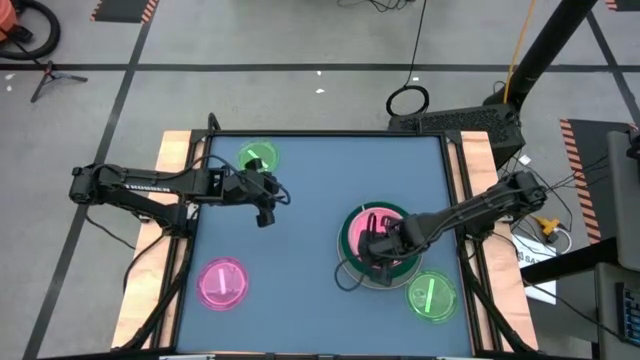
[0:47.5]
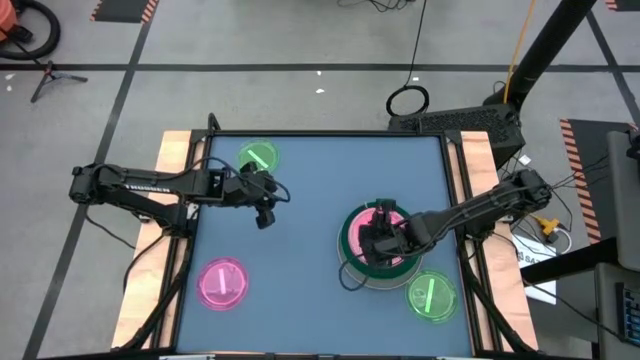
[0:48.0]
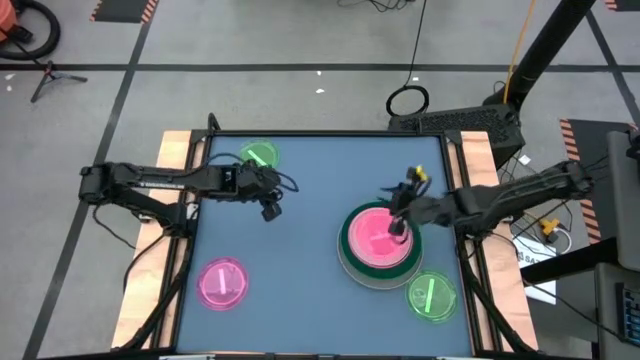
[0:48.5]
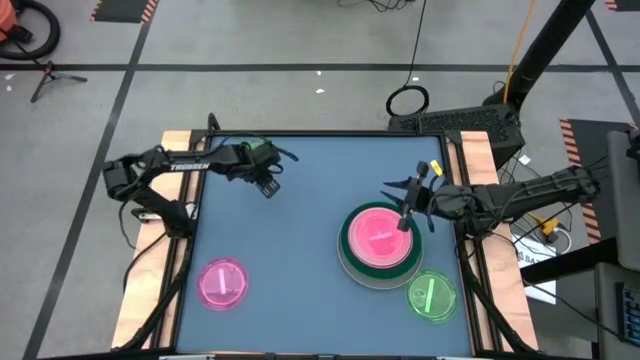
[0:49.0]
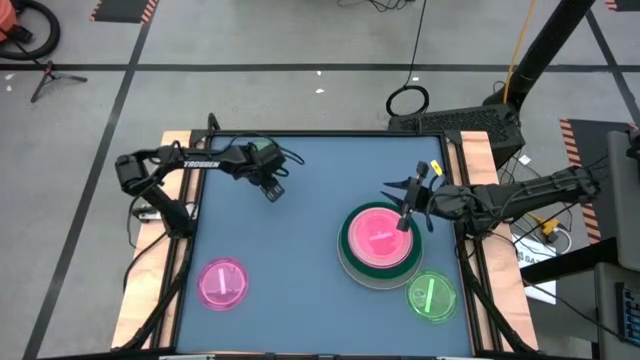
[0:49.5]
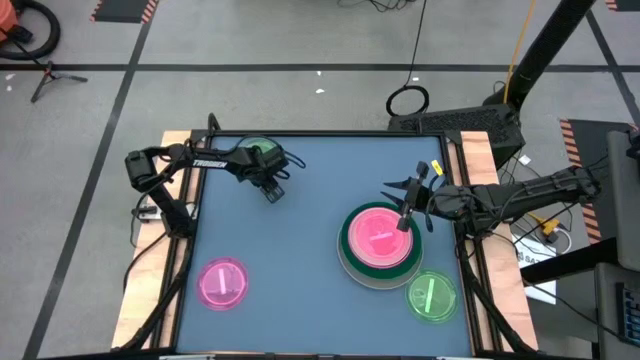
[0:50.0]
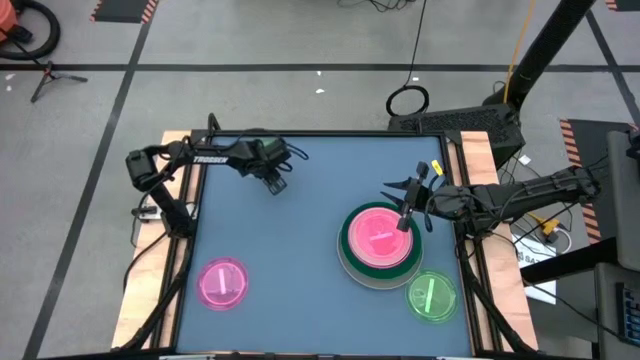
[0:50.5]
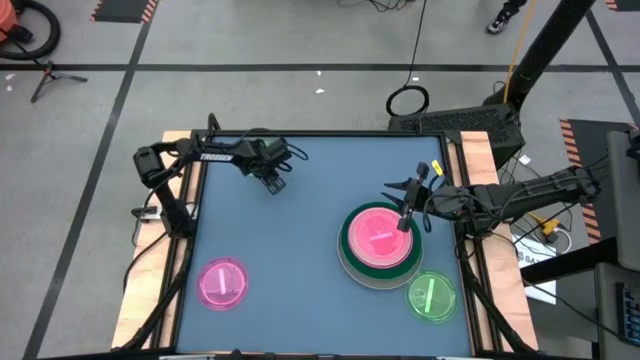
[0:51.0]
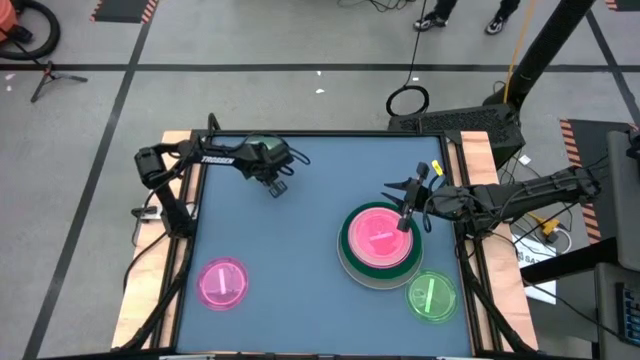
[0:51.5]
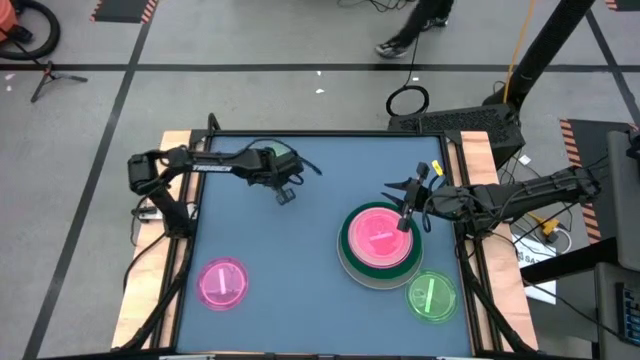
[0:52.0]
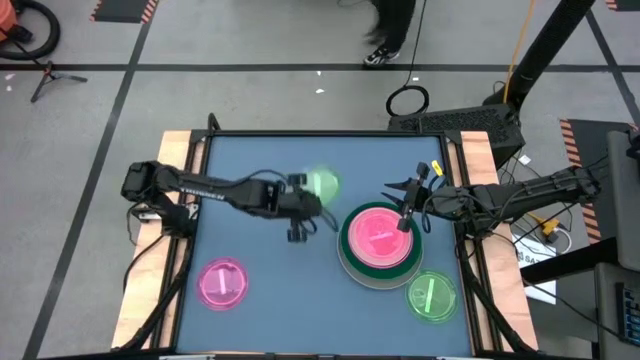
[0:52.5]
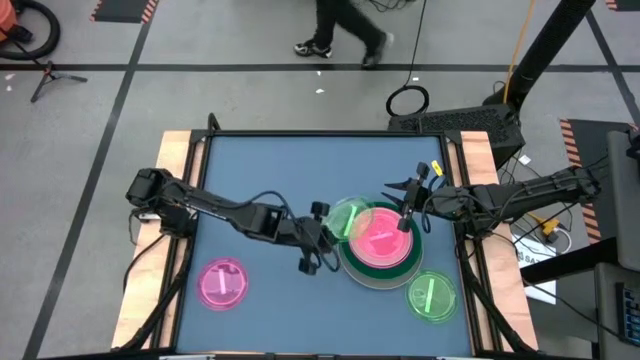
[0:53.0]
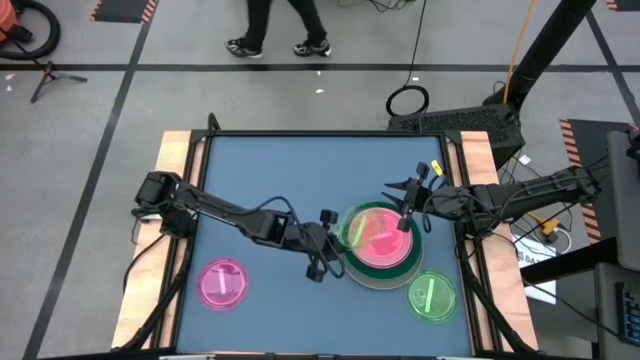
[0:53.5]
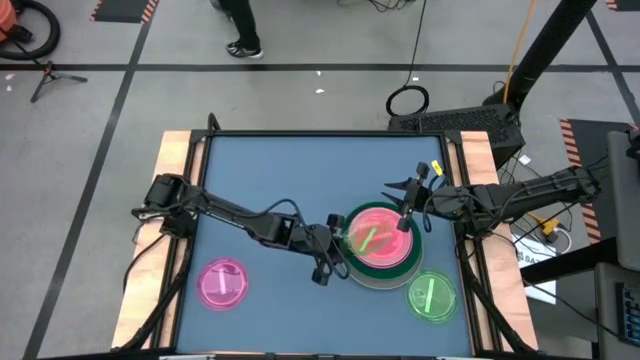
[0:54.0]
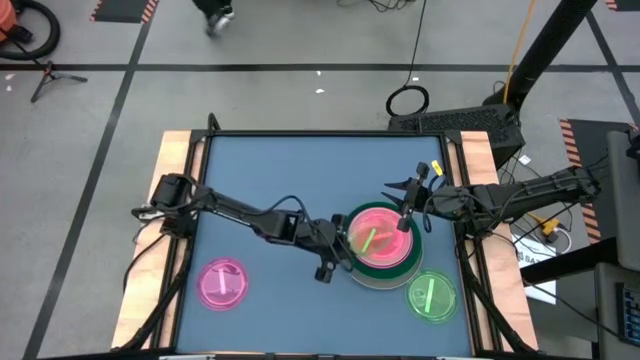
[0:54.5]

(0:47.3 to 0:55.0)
Task: Stack plastic plates
Stack the top light green plate on top of the light pink plate

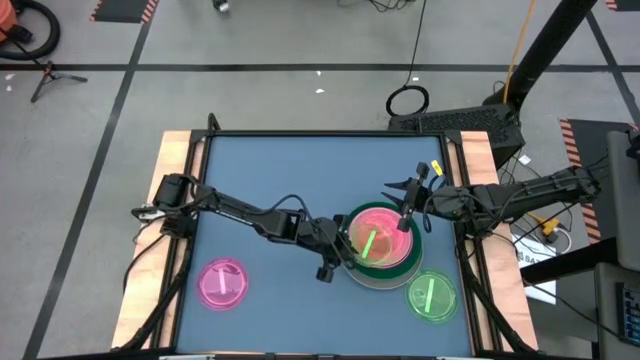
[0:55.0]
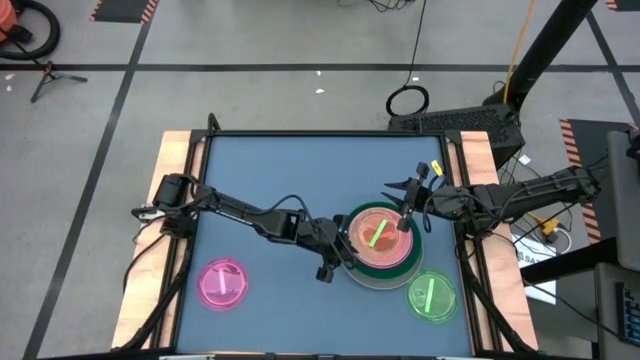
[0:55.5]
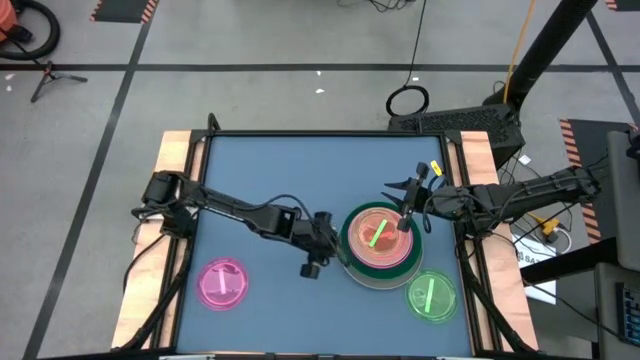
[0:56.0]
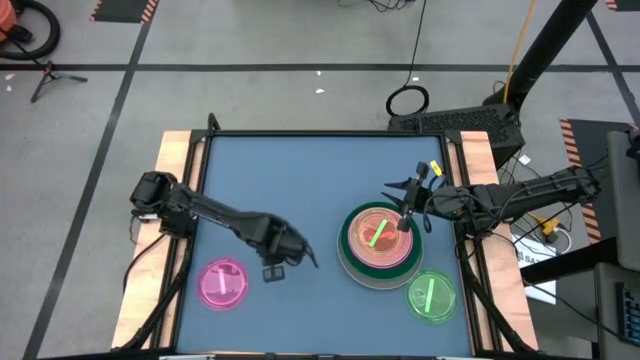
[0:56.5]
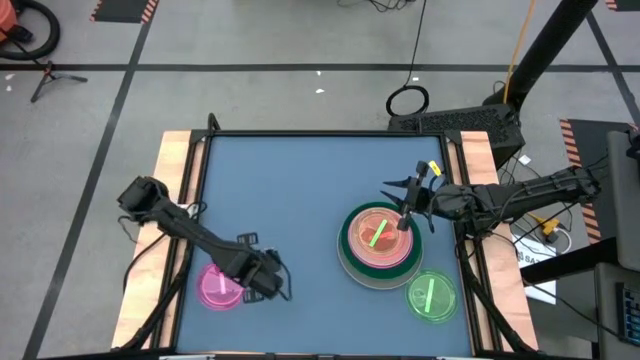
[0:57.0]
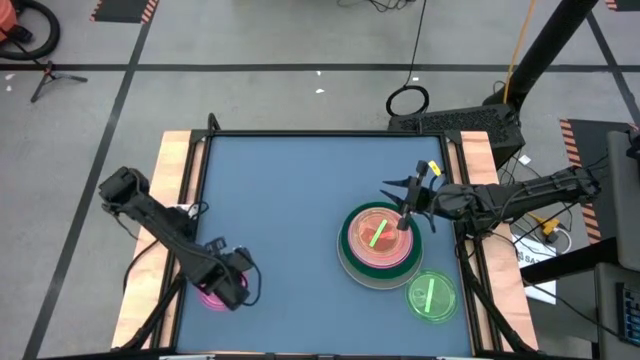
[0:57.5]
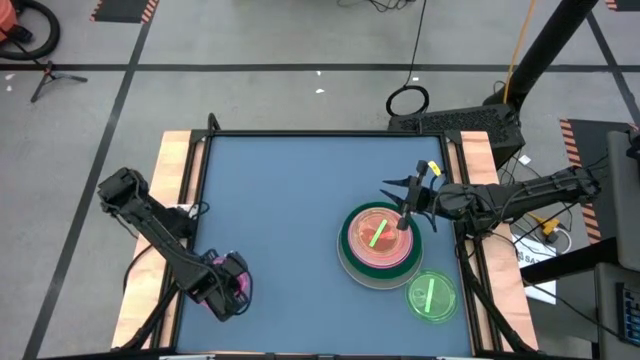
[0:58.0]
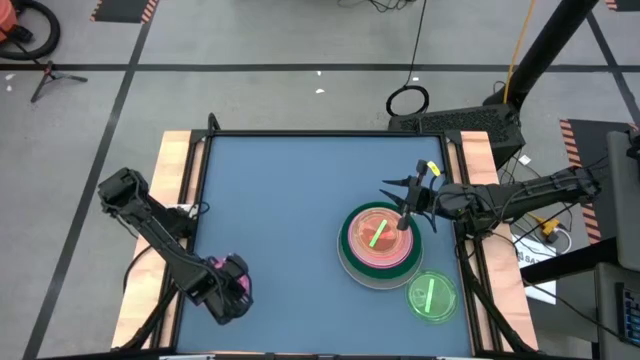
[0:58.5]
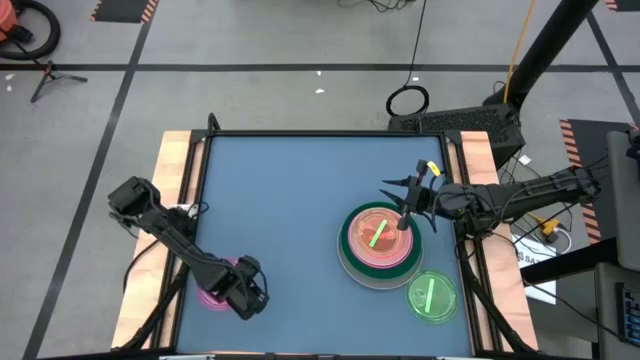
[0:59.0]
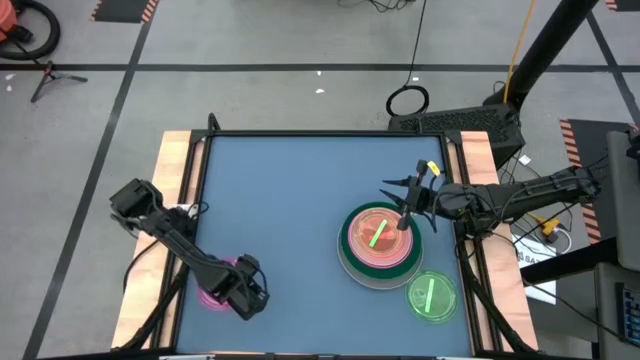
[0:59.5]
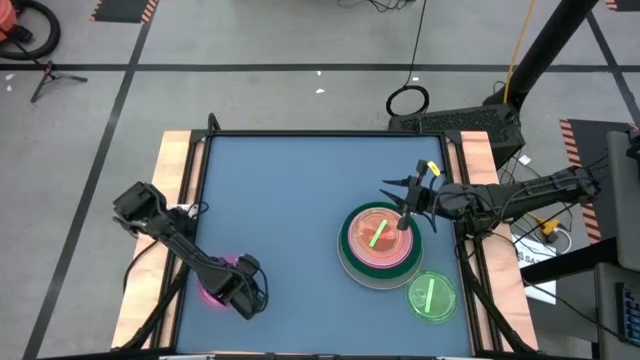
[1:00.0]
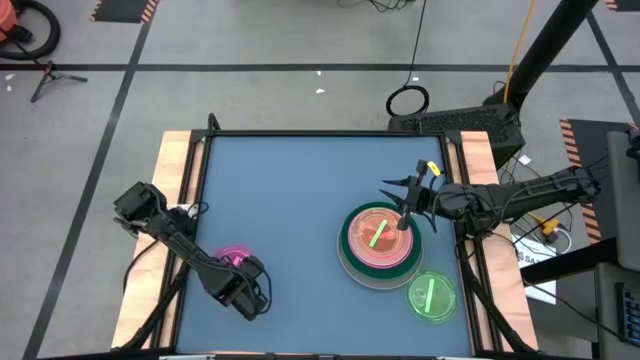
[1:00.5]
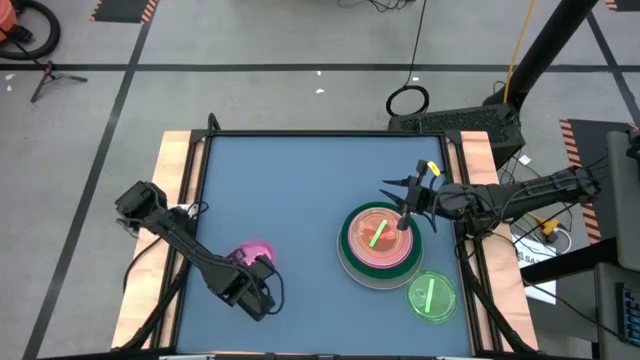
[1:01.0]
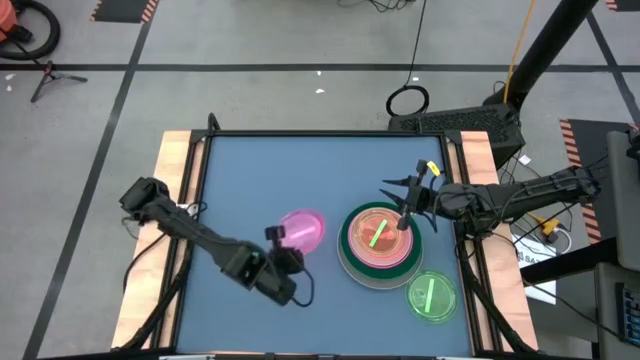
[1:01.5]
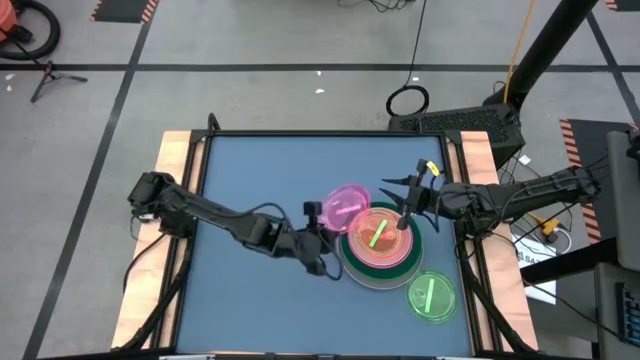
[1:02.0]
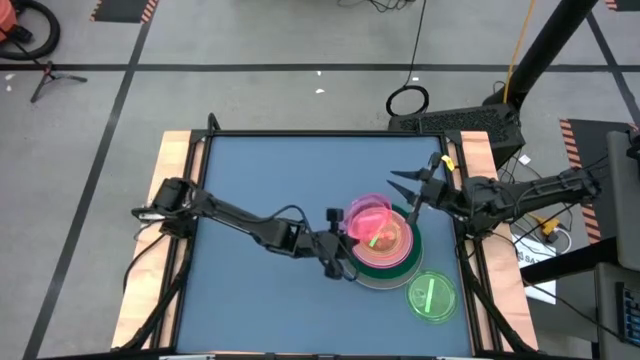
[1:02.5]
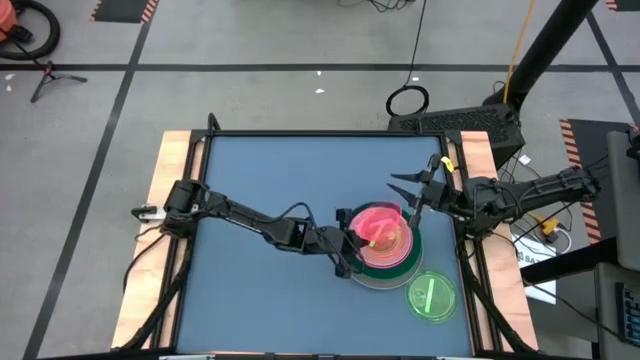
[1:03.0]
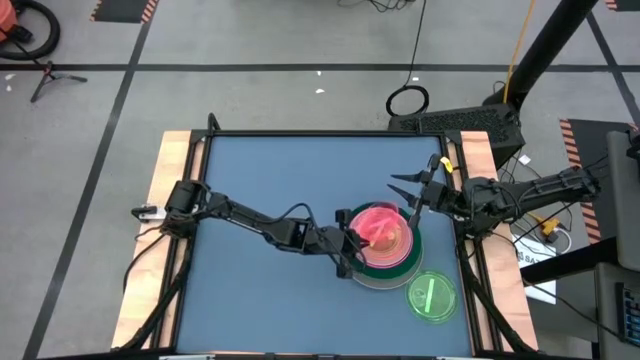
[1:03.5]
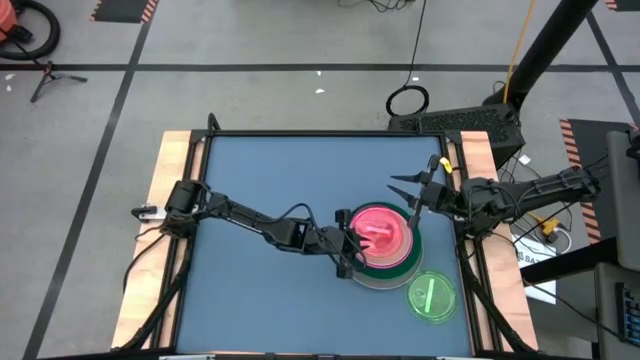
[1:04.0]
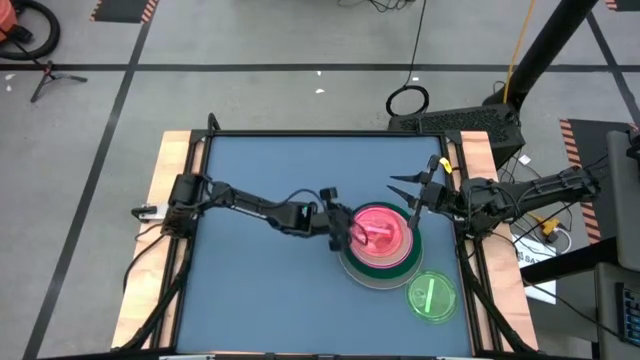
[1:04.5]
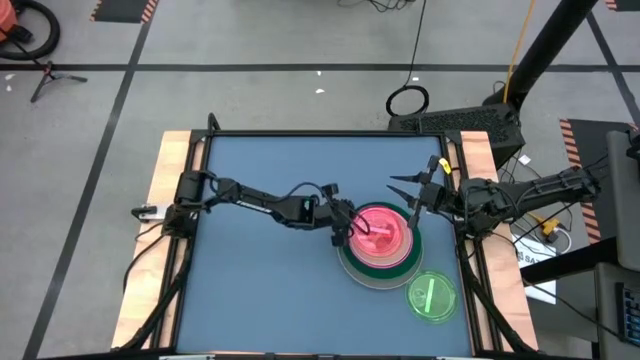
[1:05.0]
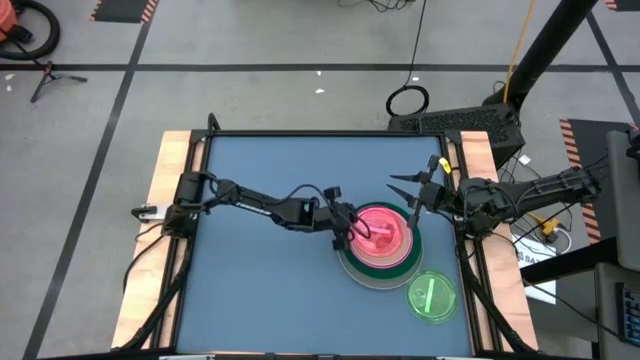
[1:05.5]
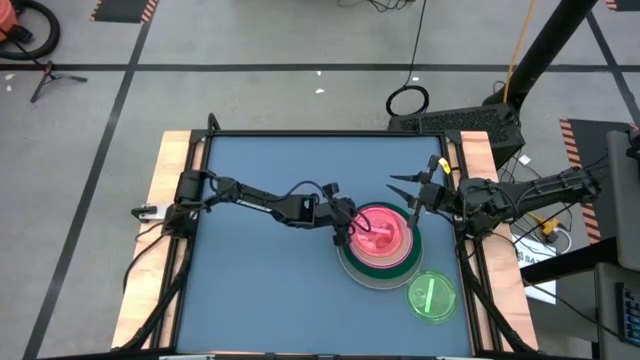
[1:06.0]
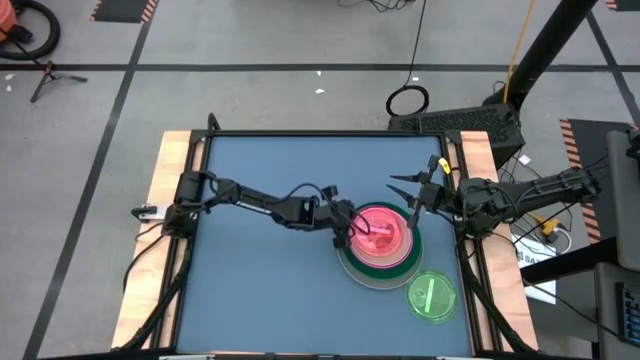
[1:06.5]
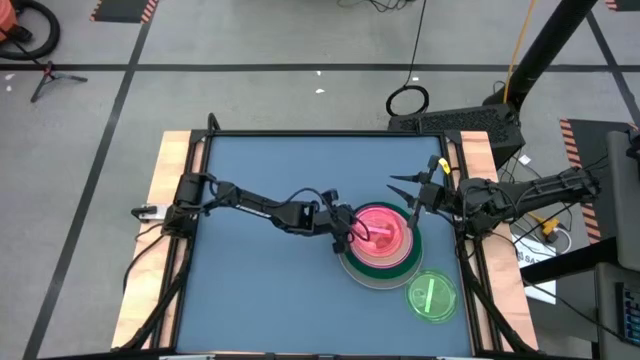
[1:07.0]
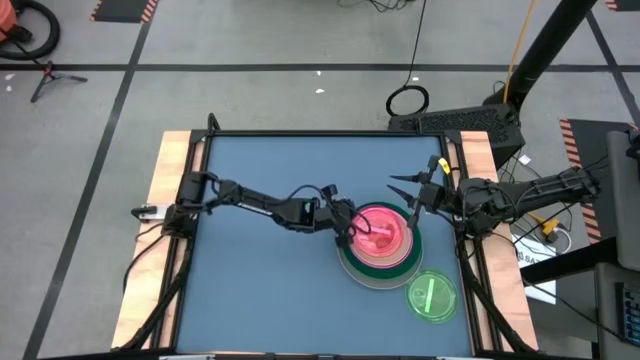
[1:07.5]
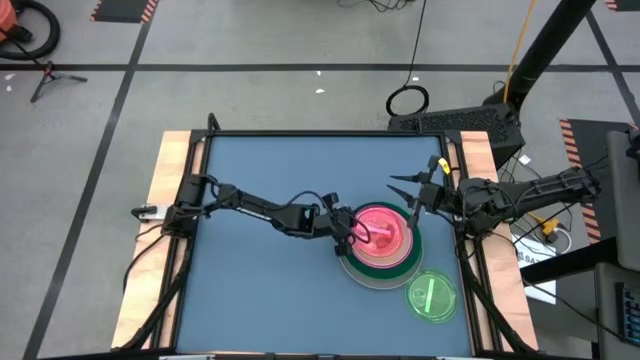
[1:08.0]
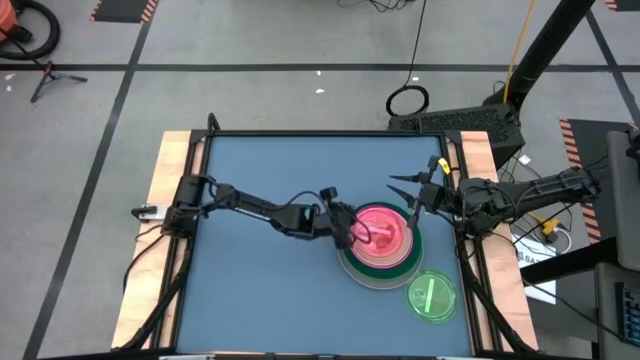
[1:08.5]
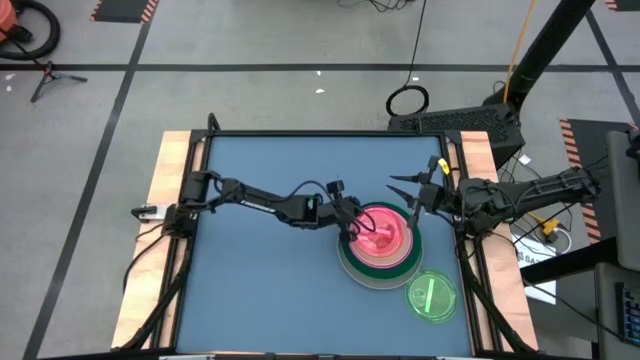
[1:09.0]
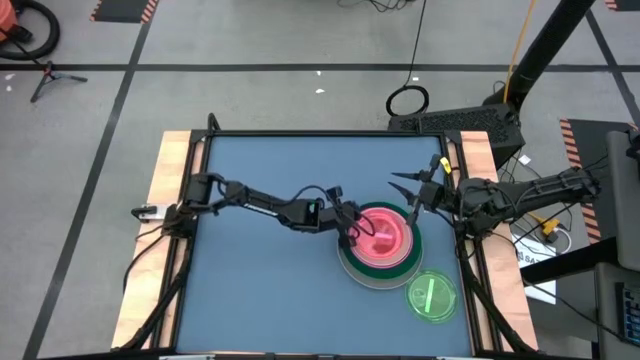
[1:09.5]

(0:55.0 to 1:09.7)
Stack the light pink plate on top of the light green plate

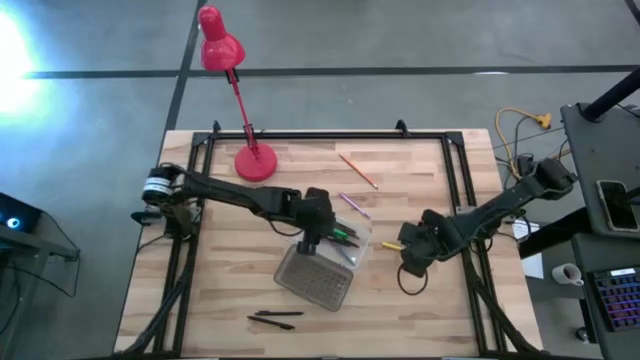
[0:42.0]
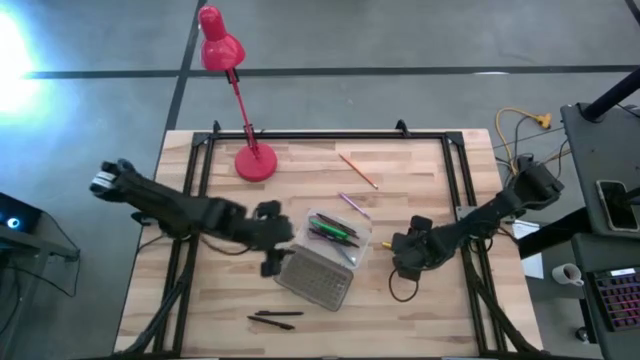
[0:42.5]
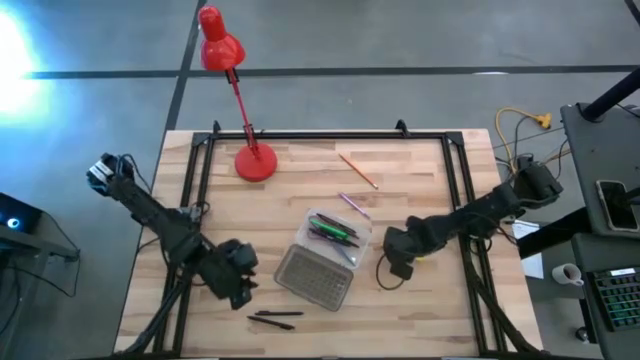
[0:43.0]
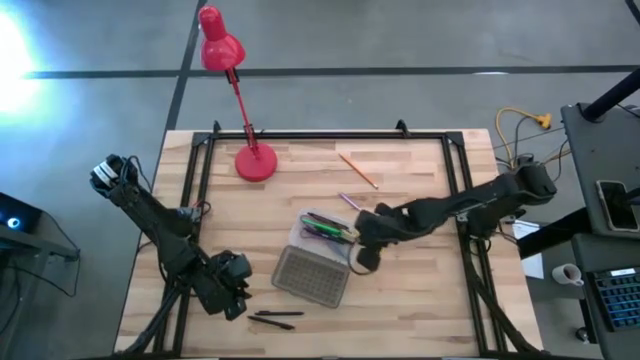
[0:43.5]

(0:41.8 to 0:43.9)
Task: Pick & place school supplies into a supply box
Put the yellow pen into the supply box
